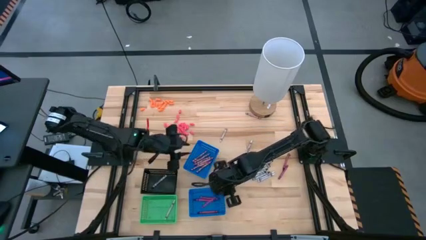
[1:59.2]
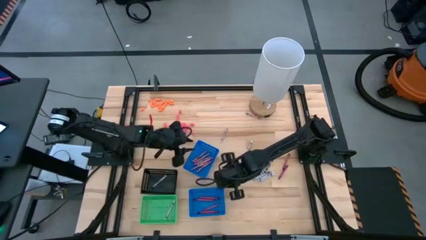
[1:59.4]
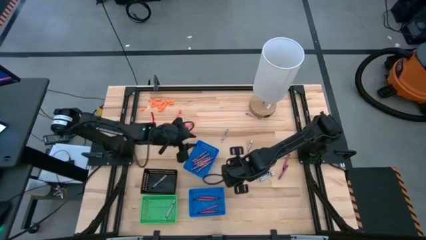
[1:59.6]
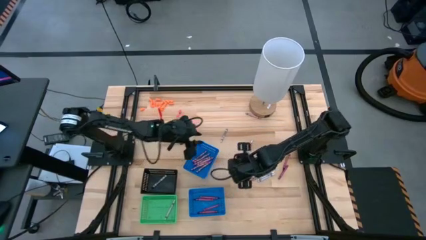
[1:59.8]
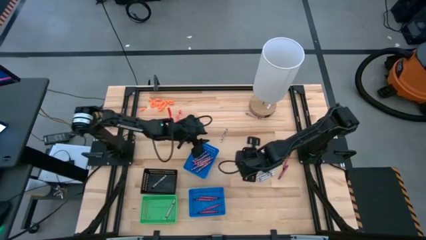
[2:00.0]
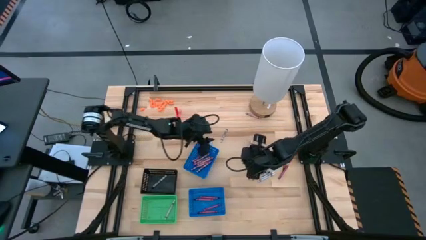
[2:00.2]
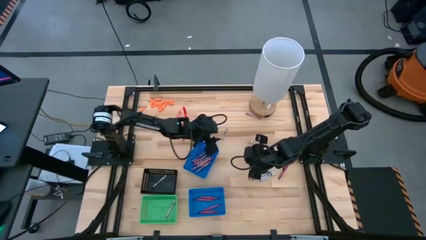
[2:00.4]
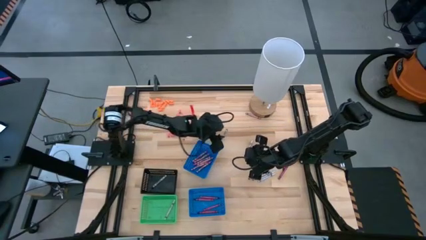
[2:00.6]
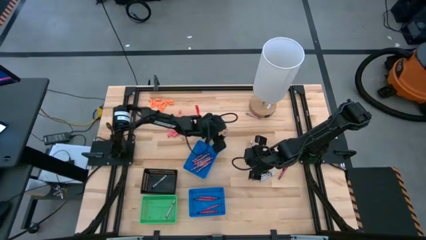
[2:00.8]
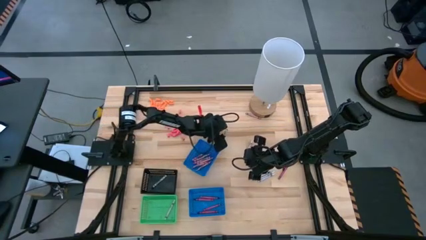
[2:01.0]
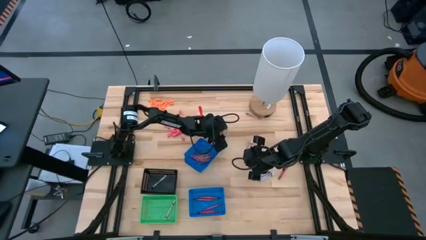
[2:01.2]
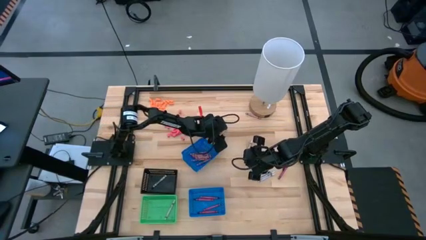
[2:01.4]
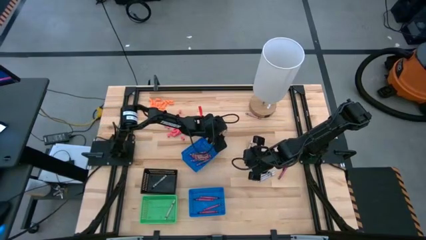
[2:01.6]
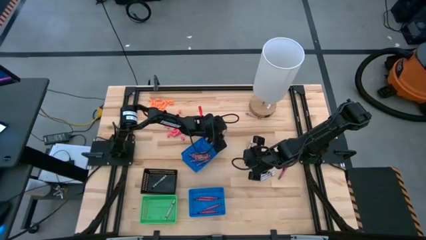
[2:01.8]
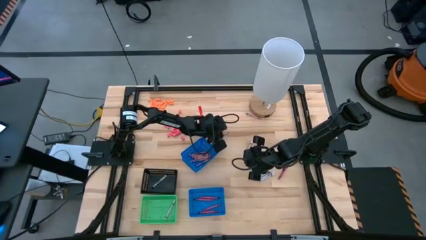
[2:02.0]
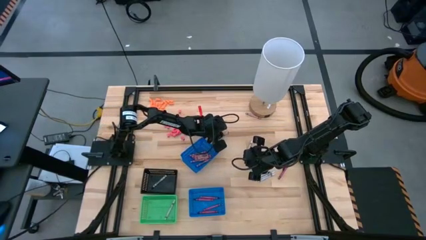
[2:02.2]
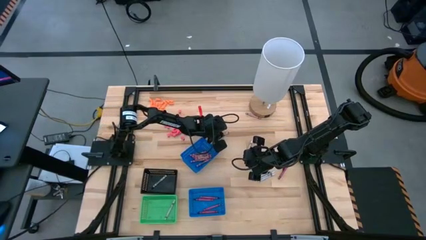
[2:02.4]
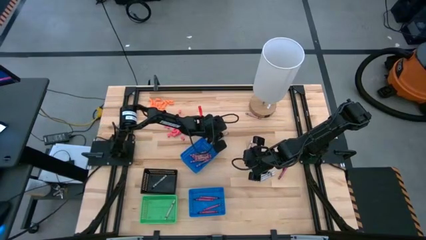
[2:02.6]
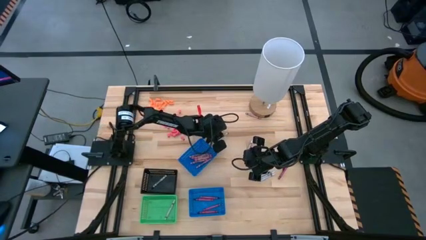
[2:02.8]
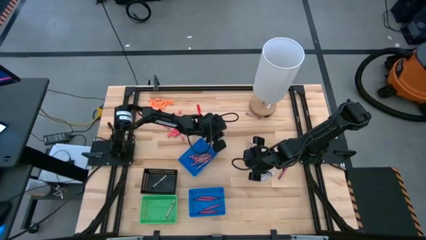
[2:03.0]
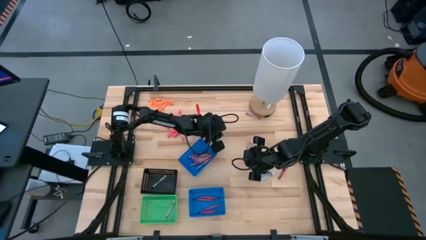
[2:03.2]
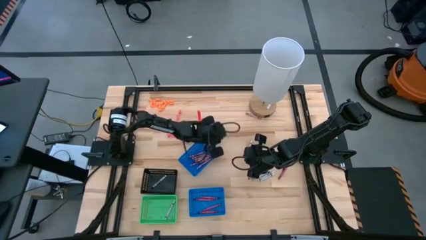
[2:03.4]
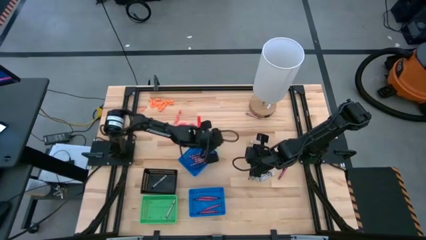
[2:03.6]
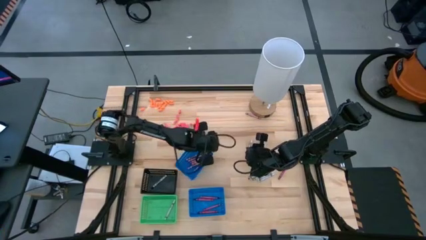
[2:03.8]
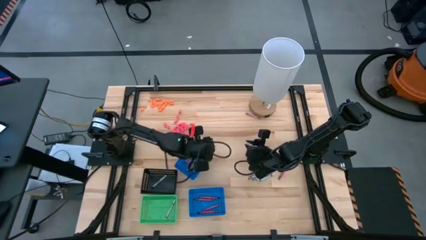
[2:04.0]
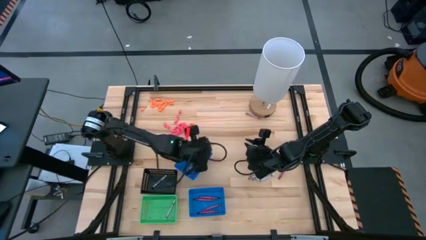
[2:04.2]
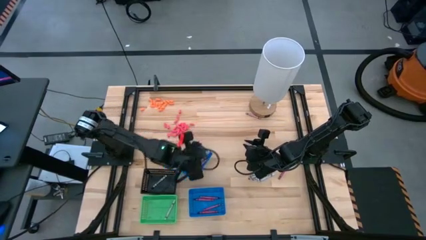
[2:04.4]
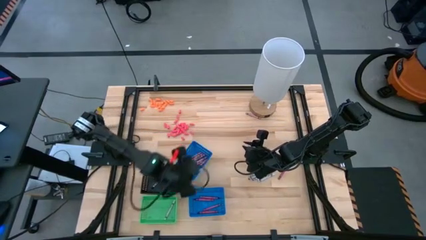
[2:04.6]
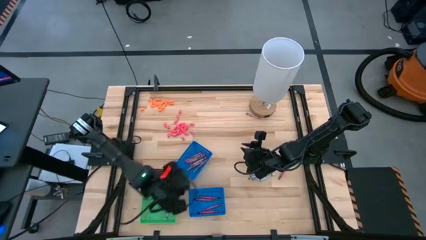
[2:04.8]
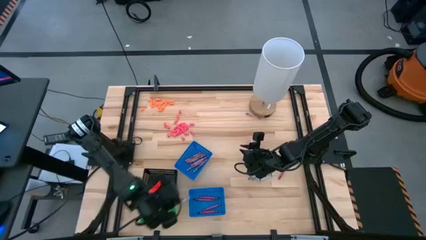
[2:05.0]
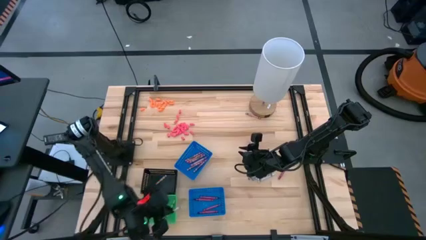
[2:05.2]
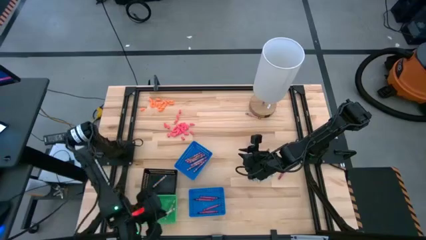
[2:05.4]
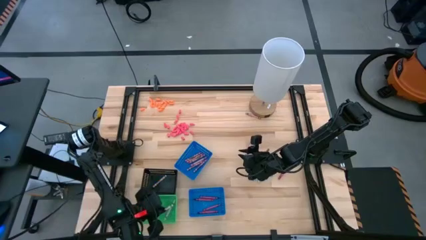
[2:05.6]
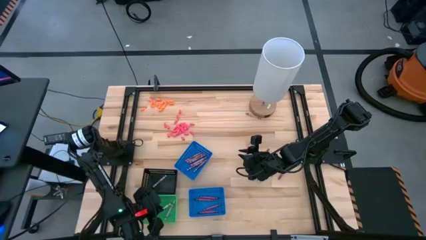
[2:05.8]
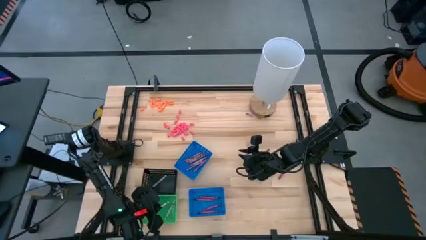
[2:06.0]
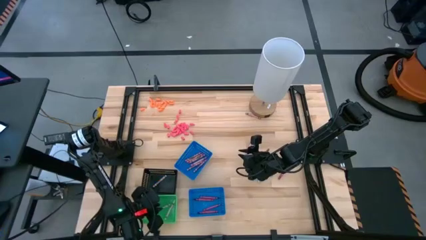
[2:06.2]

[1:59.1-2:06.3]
Task: Sort crayons
Put the white crayon into the green bin

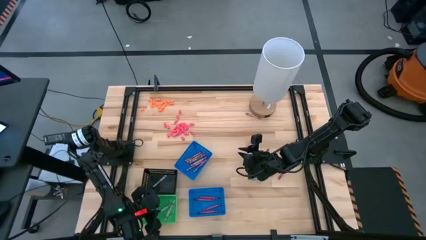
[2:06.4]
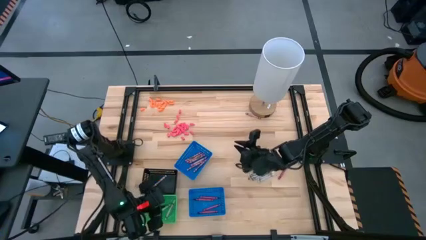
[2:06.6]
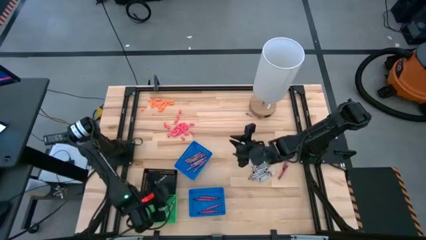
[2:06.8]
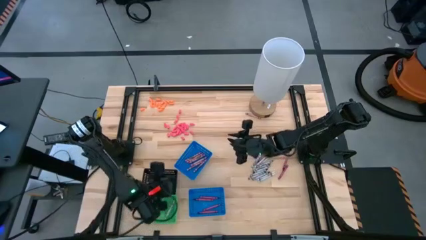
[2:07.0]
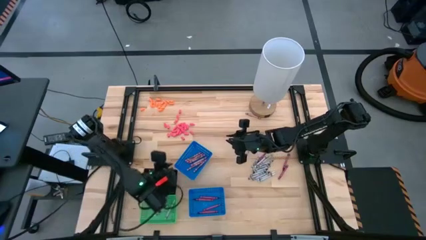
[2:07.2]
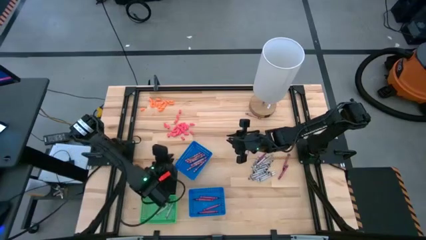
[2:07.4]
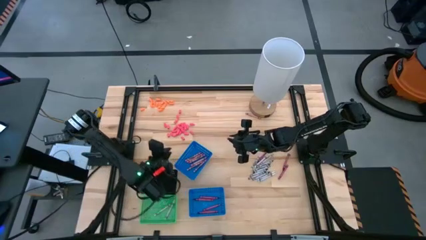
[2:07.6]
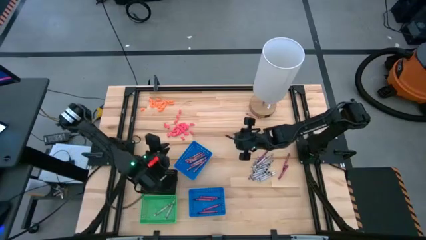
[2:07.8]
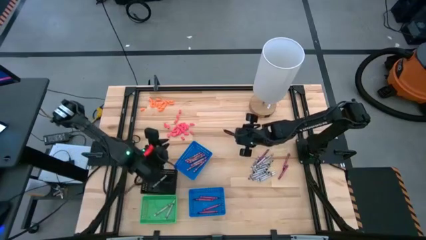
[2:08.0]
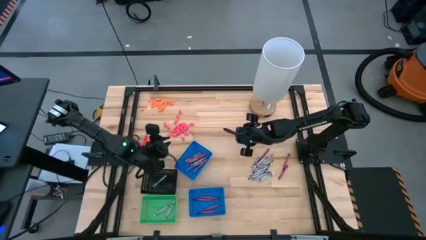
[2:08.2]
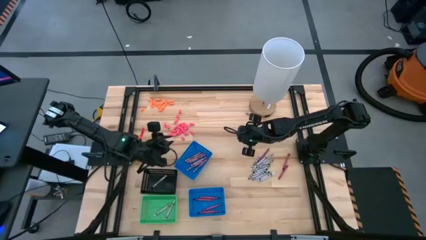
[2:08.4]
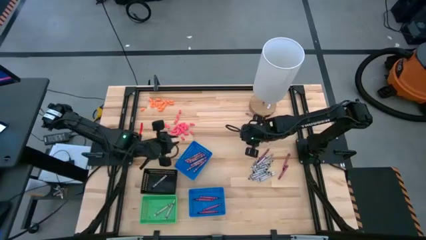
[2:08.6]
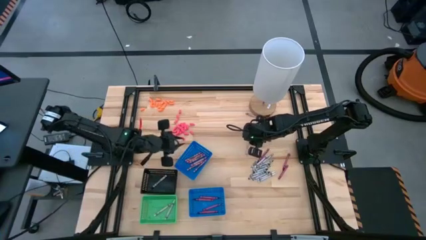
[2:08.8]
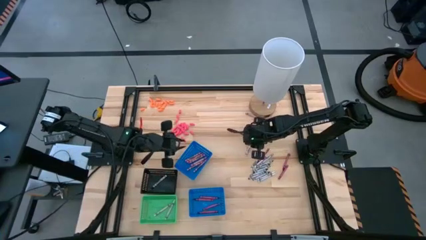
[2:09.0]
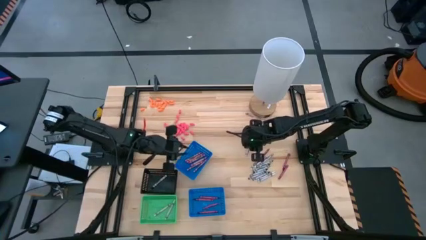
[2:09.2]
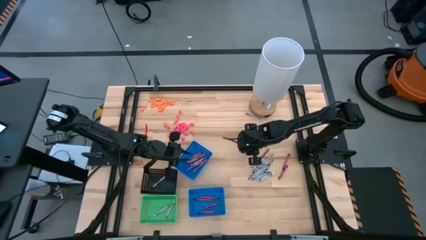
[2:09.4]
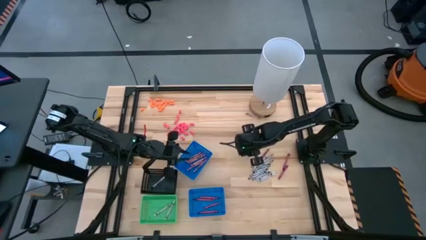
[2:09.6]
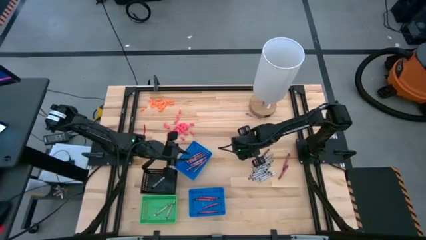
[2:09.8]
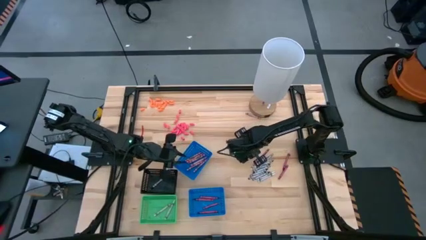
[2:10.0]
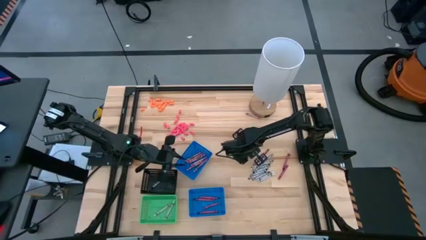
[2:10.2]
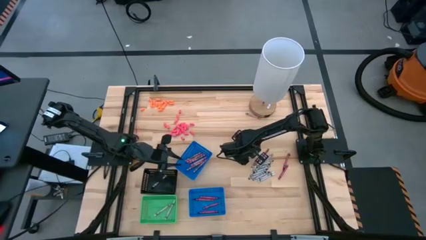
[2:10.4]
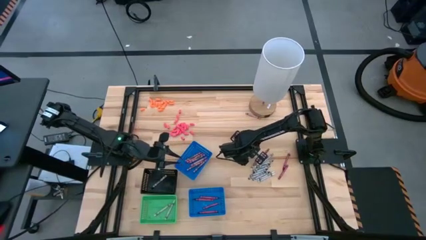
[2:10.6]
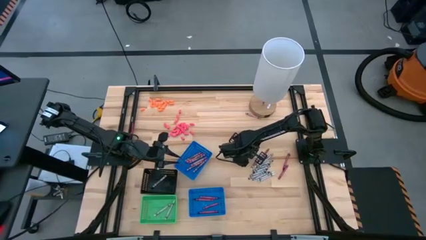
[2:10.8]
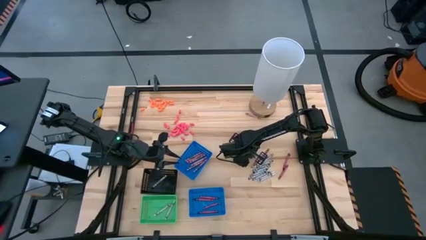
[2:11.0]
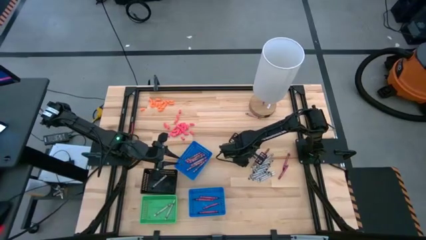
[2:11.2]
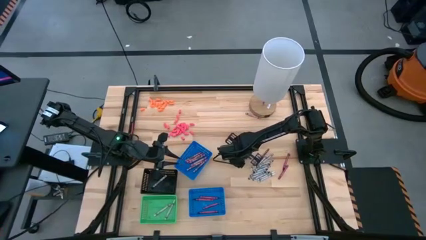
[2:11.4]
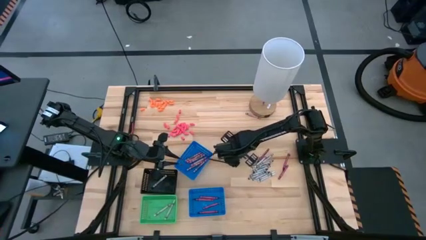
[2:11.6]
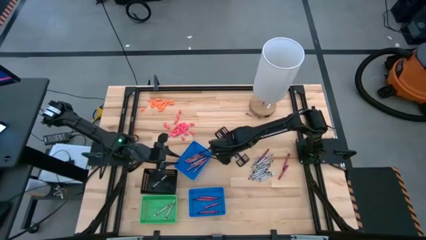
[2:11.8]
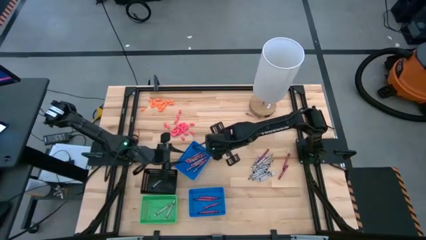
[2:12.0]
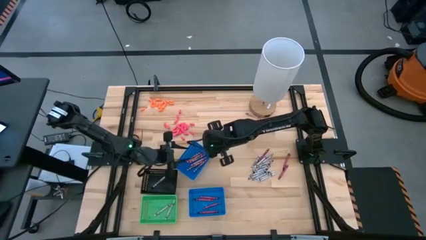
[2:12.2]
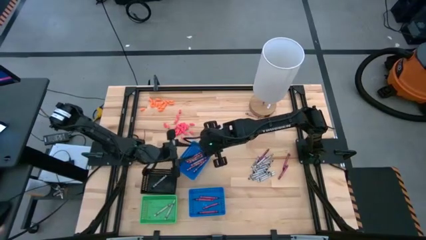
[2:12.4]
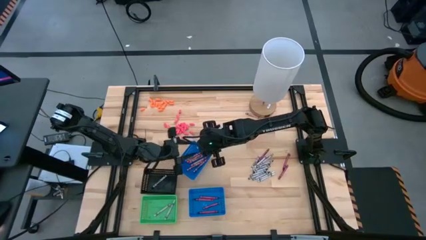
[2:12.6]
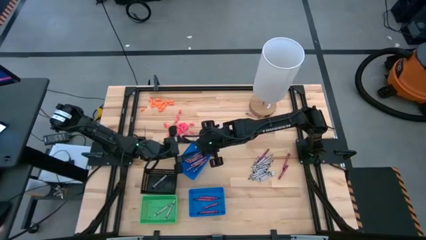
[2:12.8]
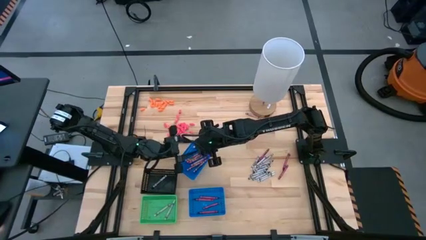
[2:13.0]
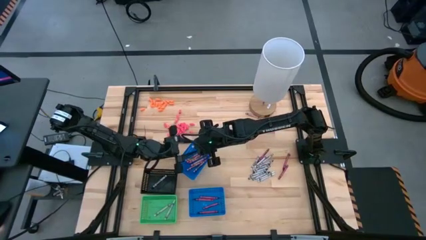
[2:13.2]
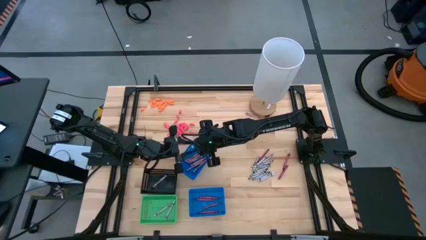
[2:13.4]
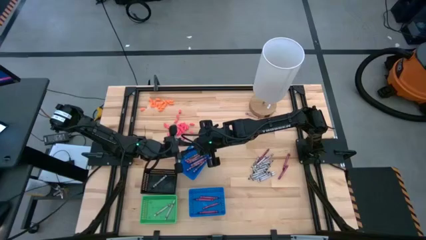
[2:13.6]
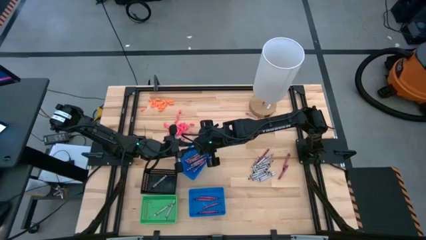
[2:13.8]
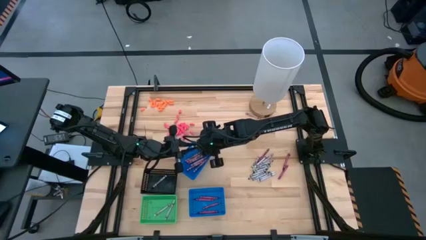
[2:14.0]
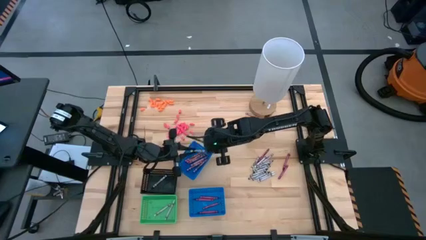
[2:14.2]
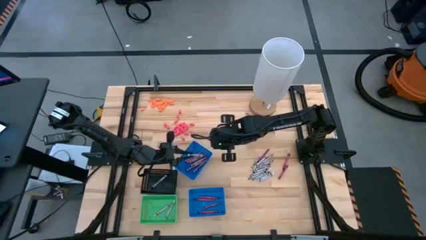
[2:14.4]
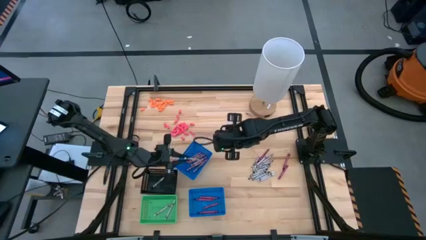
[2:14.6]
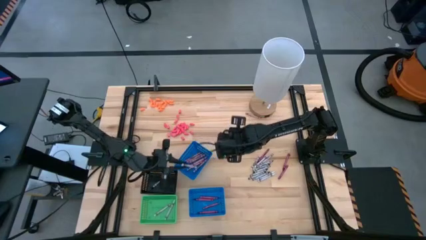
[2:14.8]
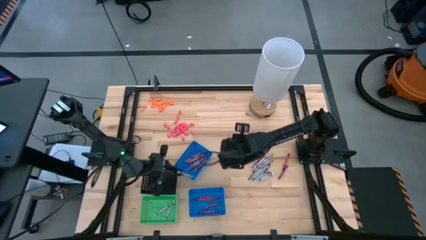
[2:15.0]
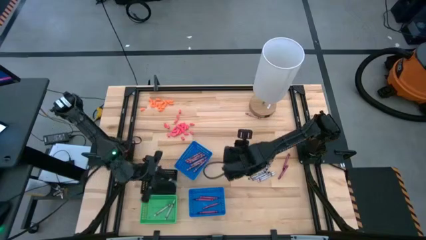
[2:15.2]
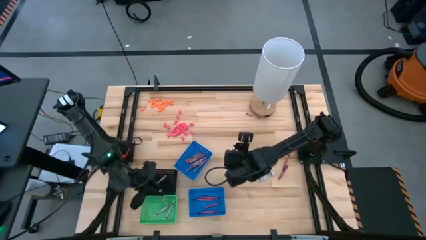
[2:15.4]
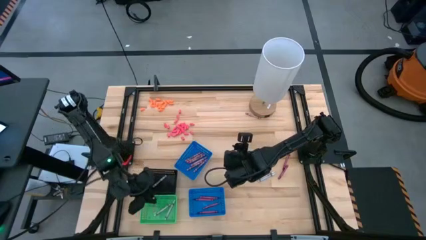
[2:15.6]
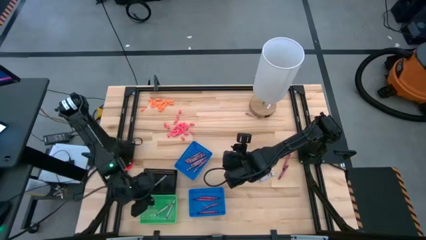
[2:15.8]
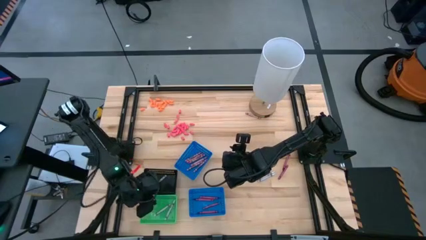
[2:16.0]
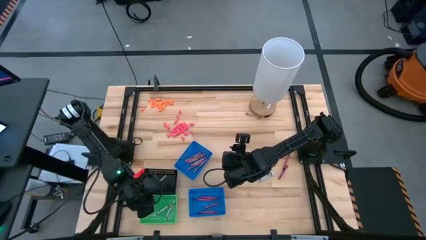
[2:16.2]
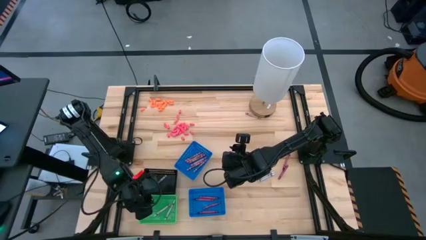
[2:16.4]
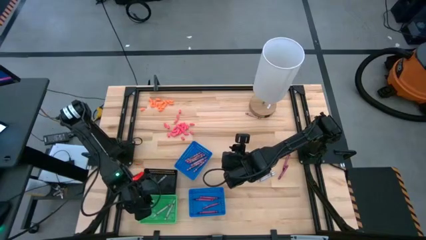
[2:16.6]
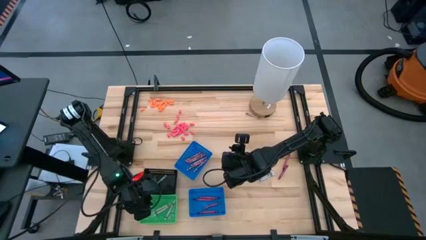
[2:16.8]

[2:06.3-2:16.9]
Put the white crayon into the green bin
